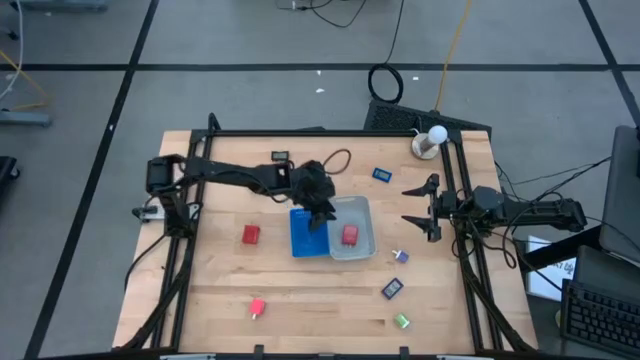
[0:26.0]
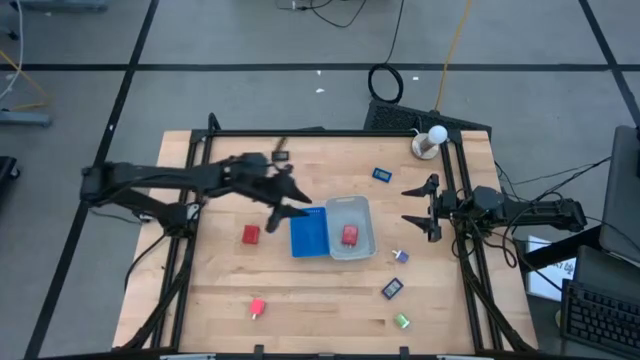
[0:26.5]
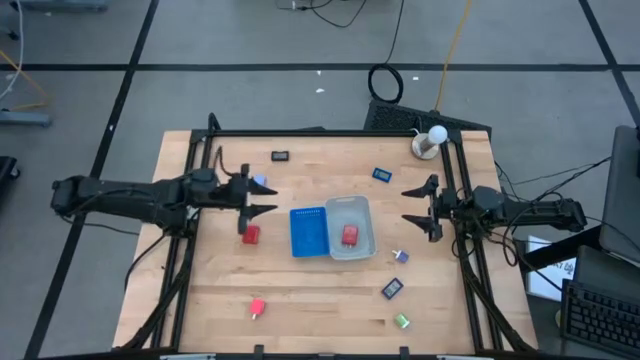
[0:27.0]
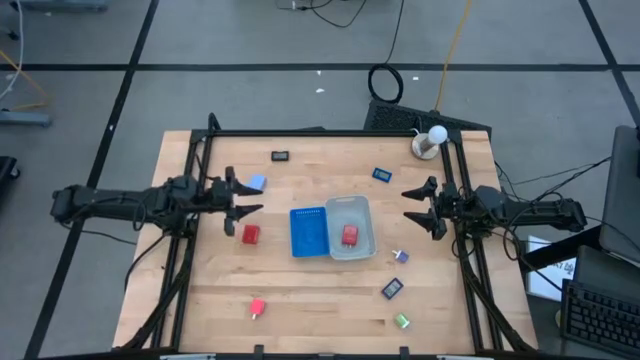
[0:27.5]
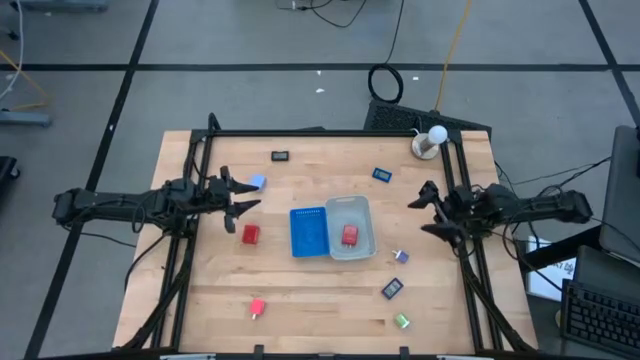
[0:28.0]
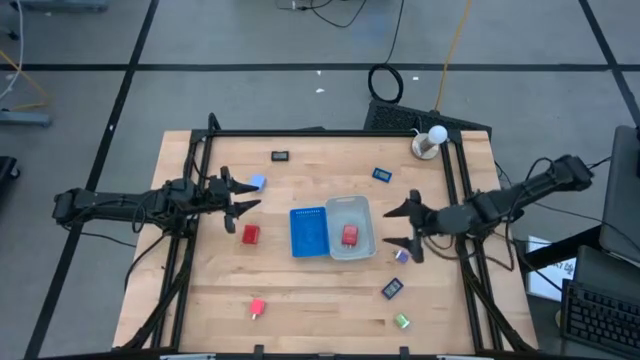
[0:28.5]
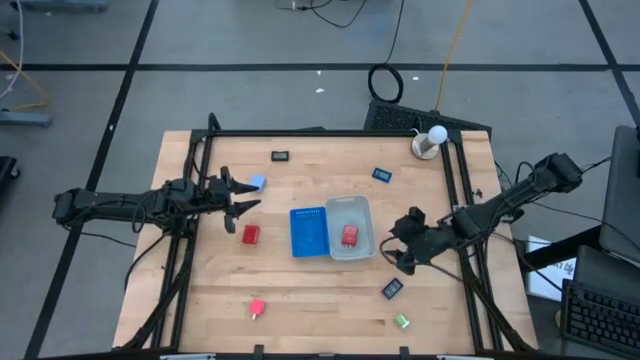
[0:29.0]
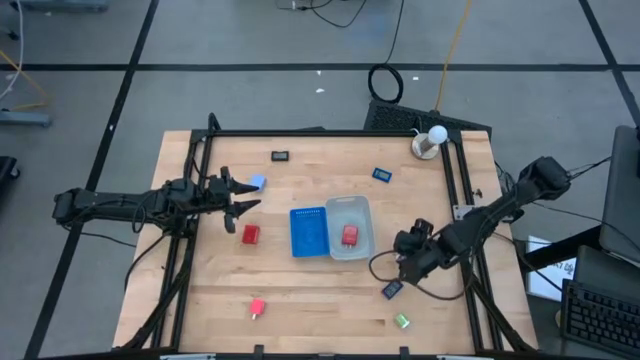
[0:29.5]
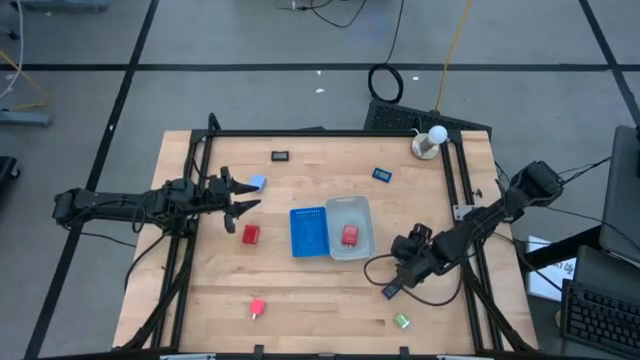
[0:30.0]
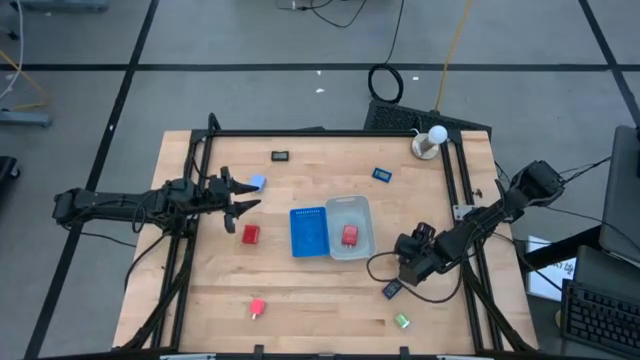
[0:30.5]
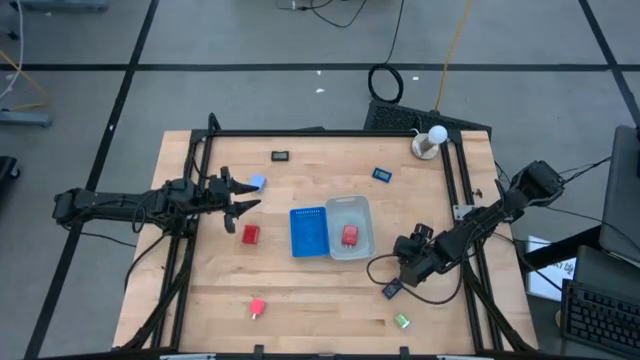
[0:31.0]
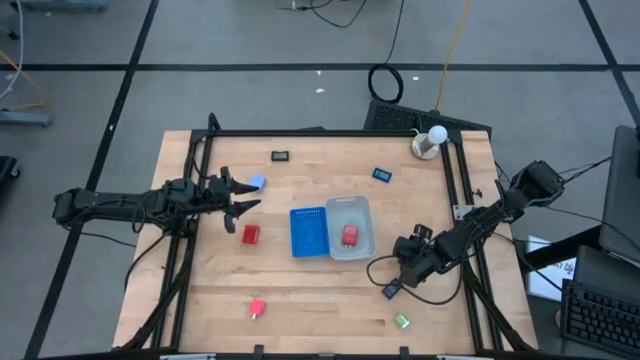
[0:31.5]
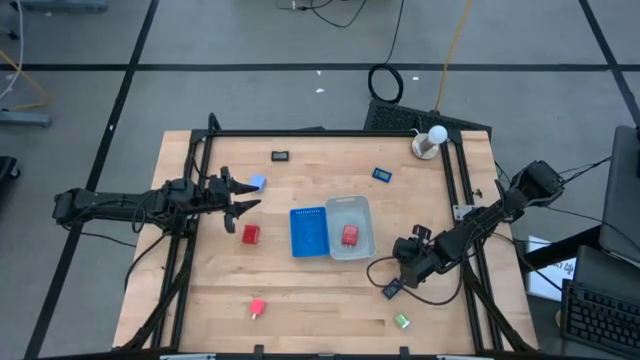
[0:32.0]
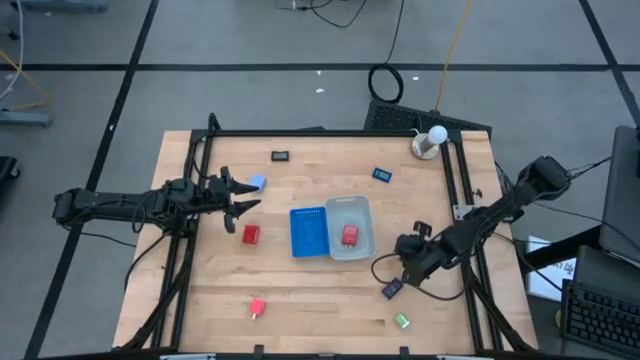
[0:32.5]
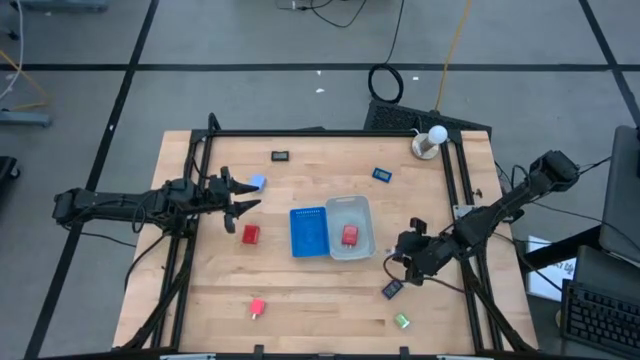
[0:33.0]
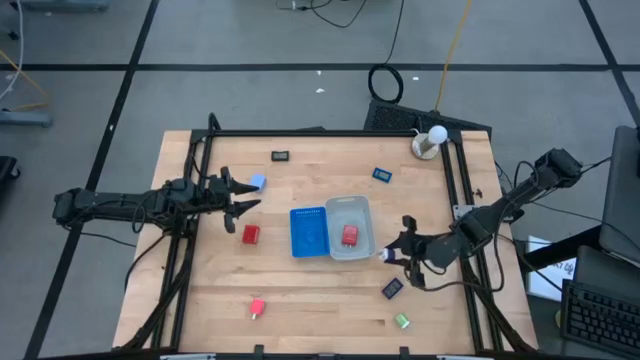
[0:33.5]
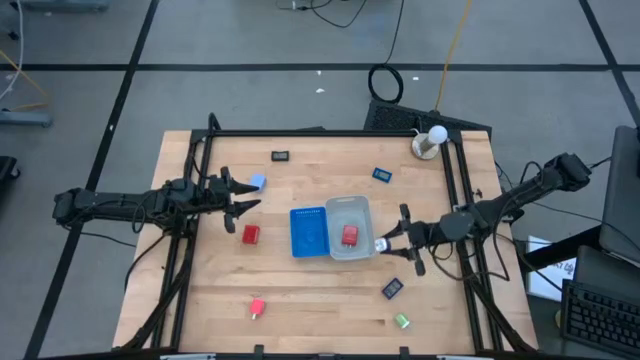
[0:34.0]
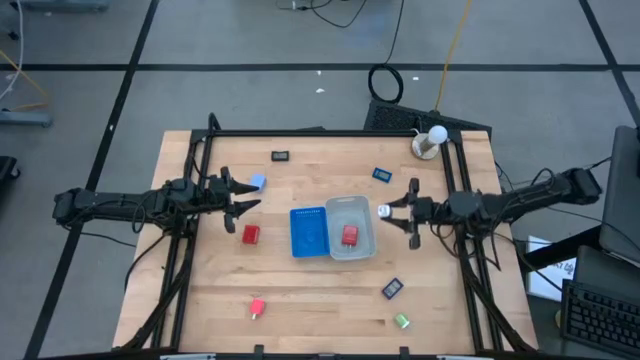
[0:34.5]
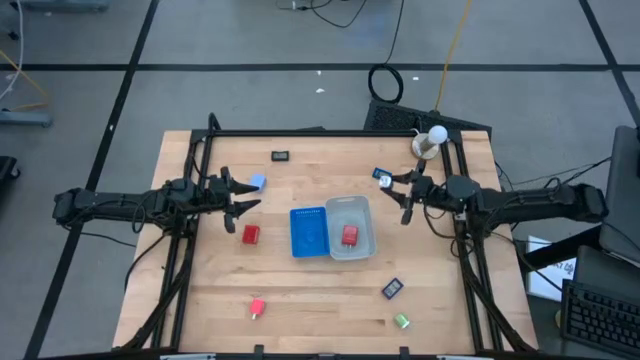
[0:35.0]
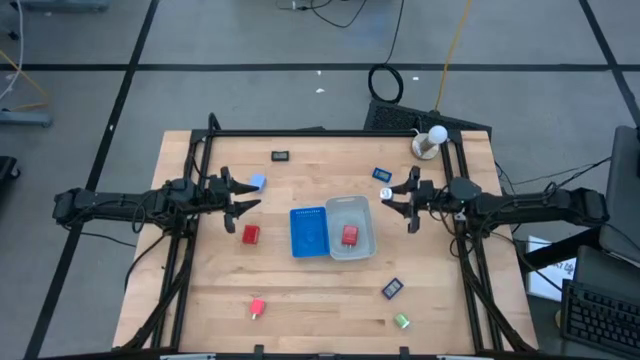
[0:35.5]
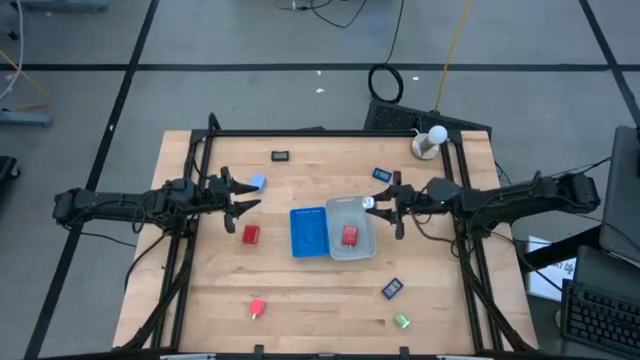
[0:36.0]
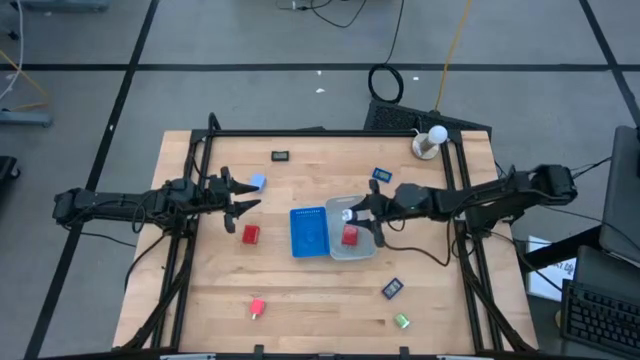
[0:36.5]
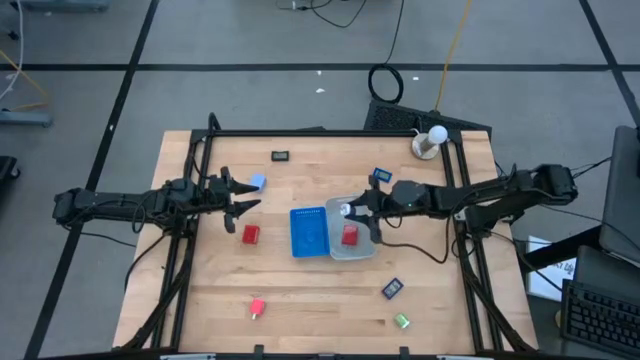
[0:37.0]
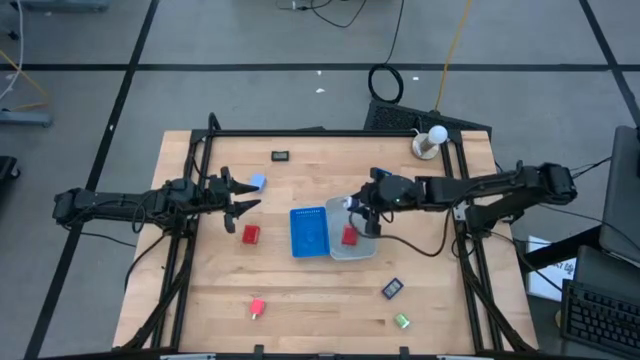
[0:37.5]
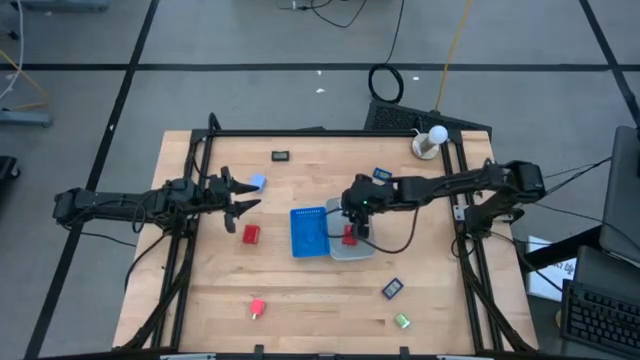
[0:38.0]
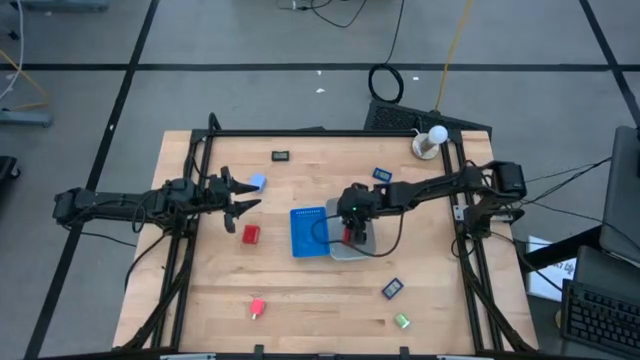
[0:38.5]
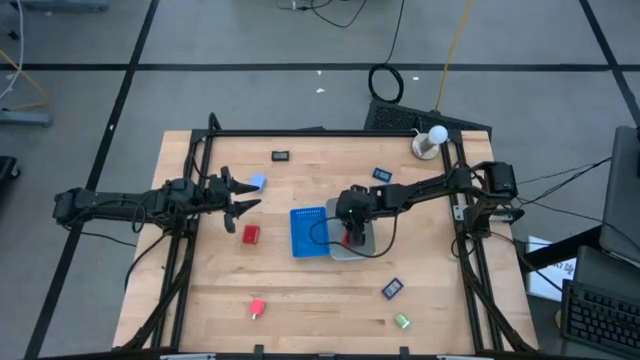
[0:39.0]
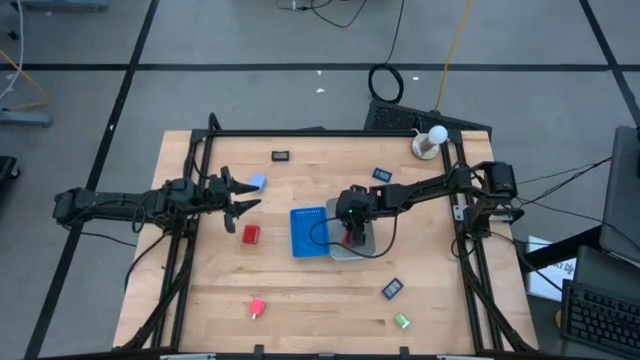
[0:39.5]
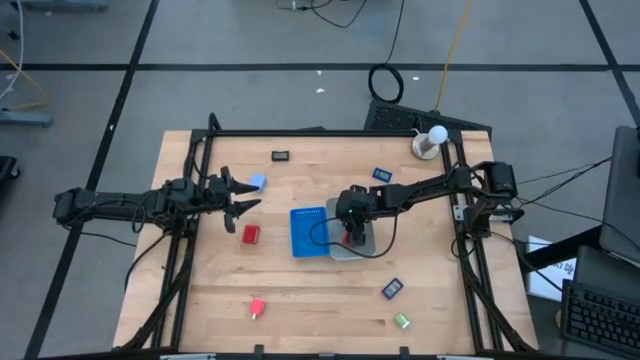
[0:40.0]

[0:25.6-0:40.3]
Task: Pick & Place Office items
Put the violet charger adapter into the gray bin

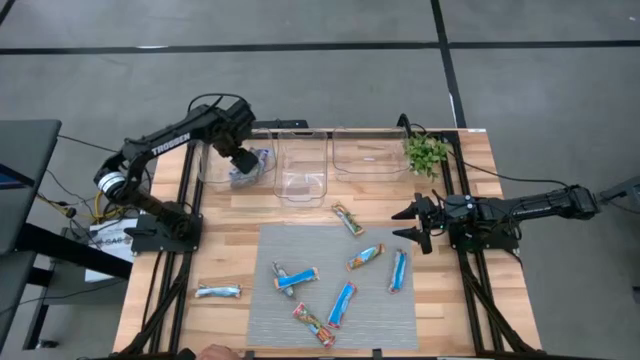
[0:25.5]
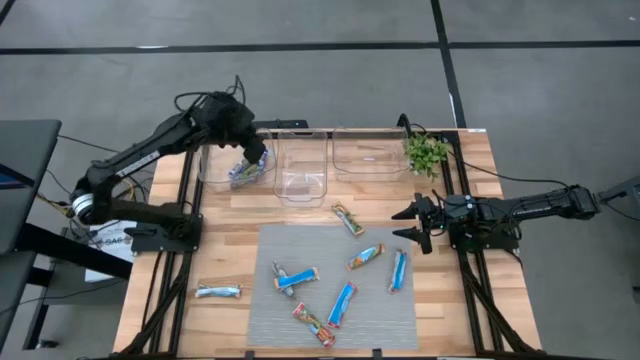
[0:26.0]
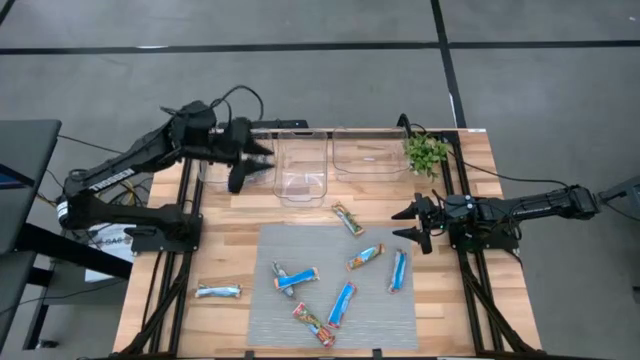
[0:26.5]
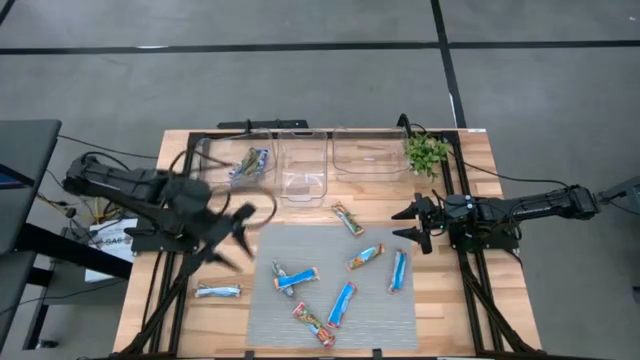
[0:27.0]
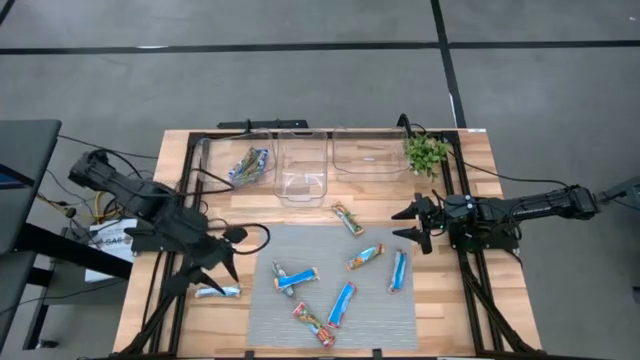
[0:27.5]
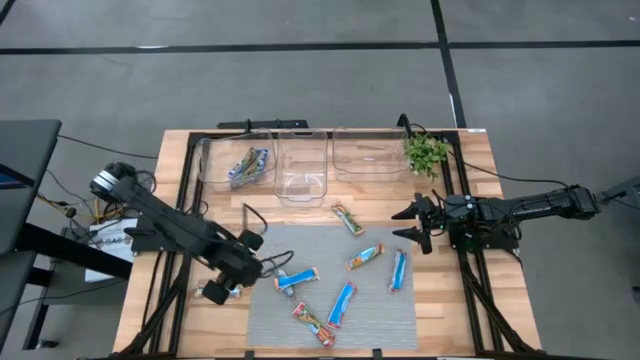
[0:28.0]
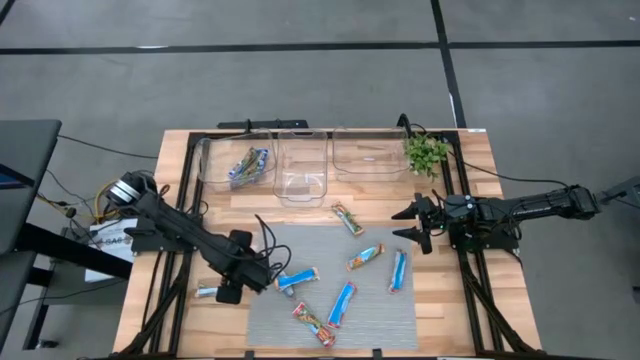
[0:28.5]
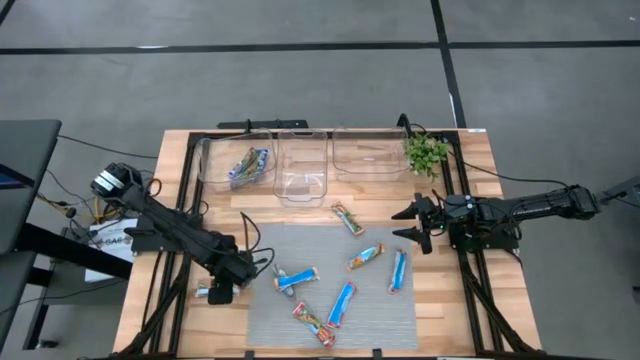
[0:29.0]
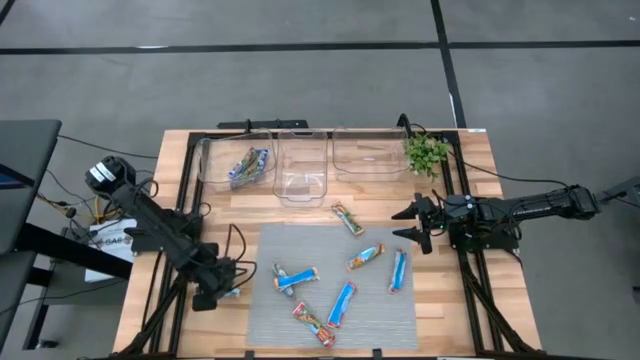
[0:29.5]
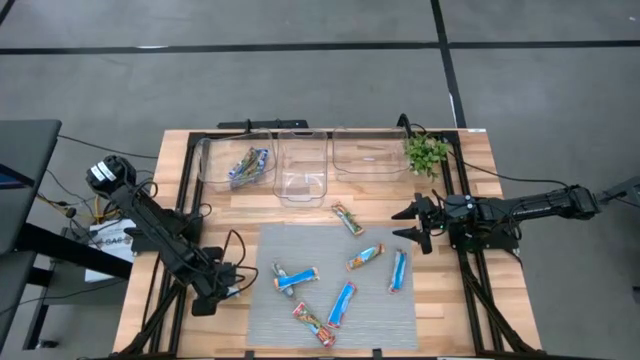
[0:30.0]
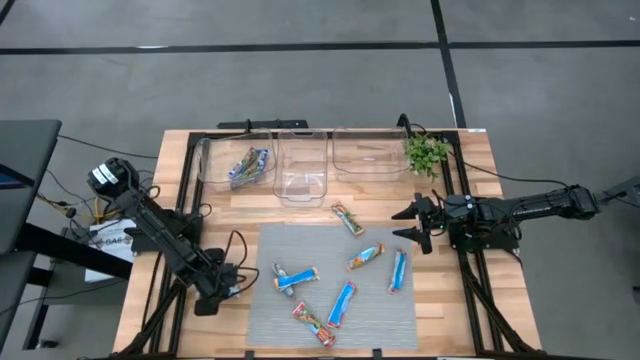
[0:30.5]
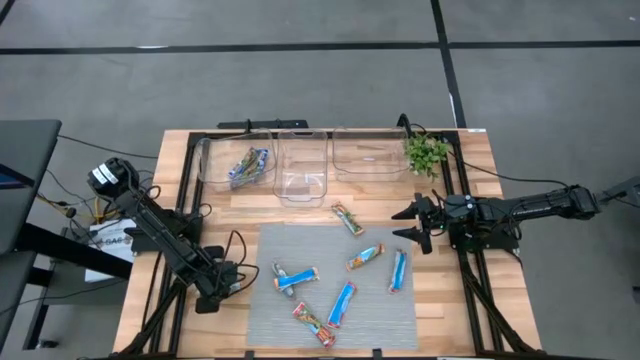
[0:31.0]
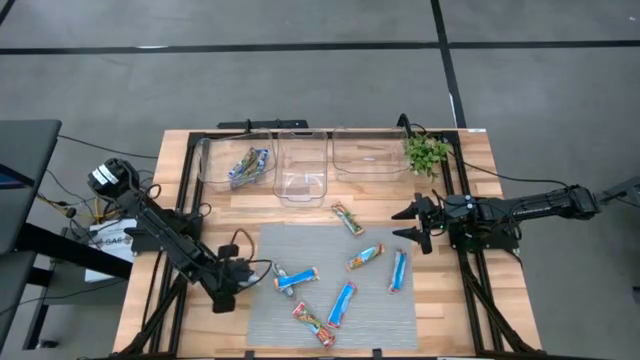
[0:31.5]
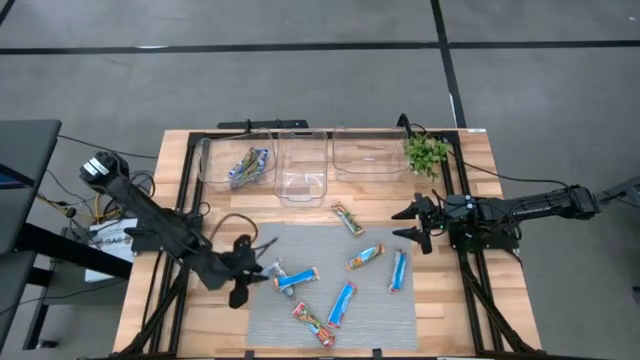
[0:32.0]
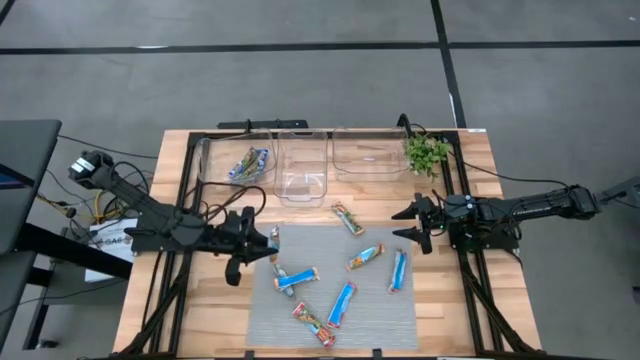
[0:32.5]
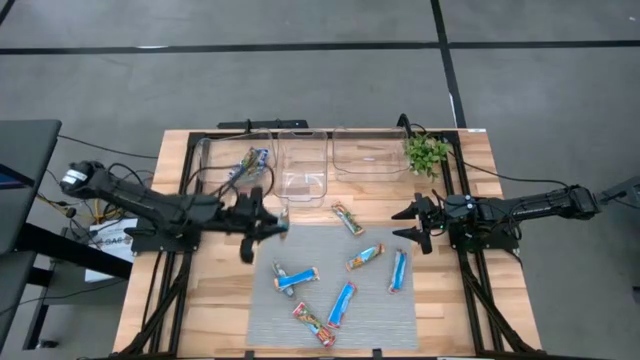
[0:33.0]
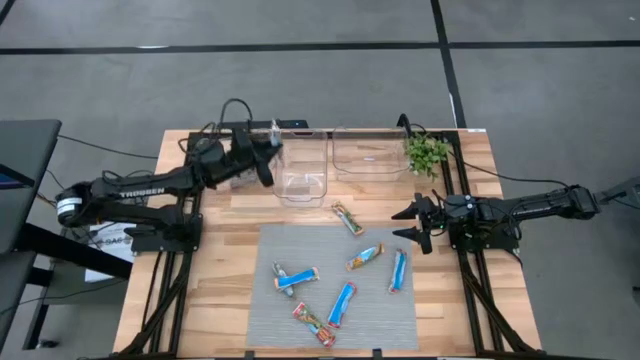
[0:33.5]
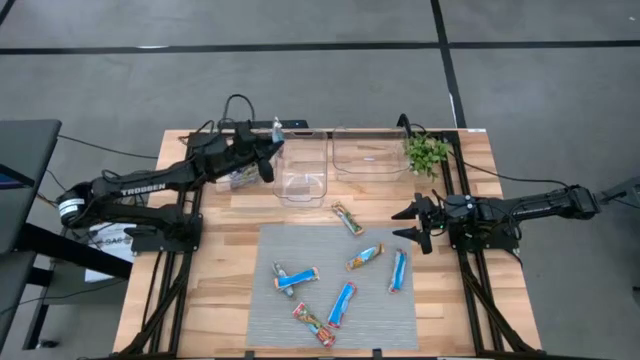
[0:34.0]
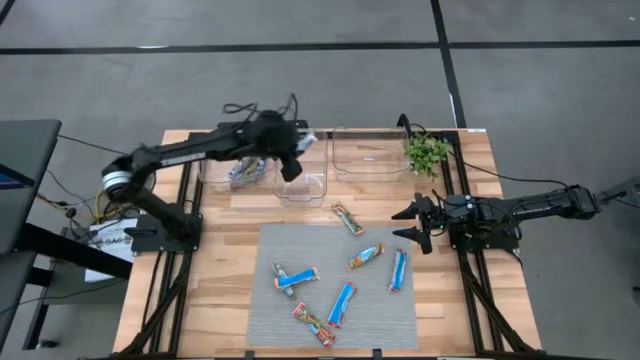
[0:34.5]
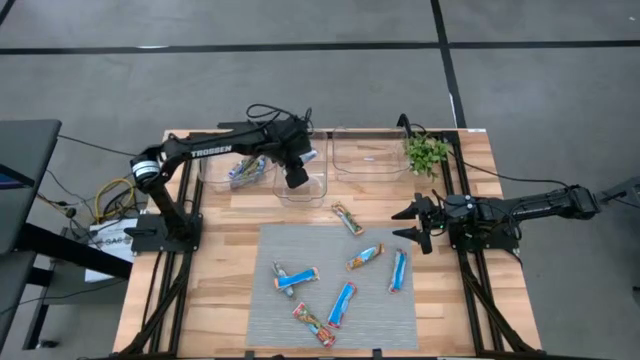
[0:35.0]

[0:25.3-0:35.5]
Task: Pick and place Granola Bars by type
Put the yellow granola bar into the center transparent bin
